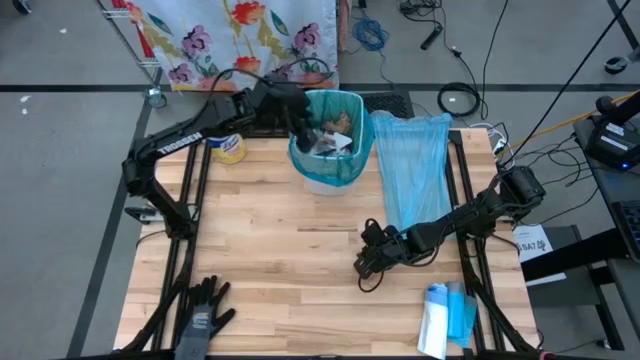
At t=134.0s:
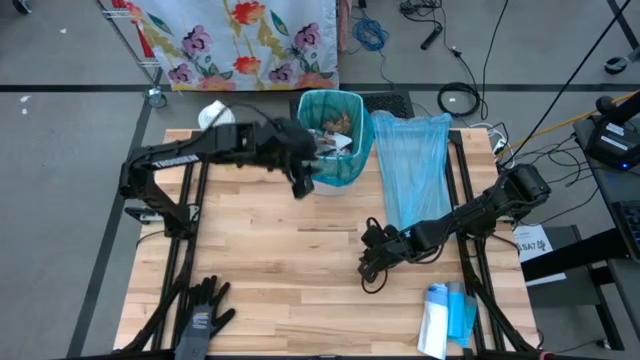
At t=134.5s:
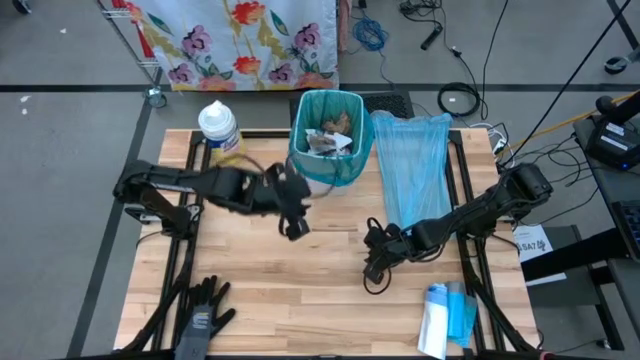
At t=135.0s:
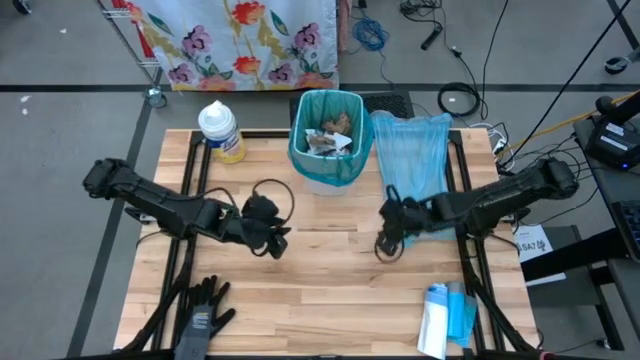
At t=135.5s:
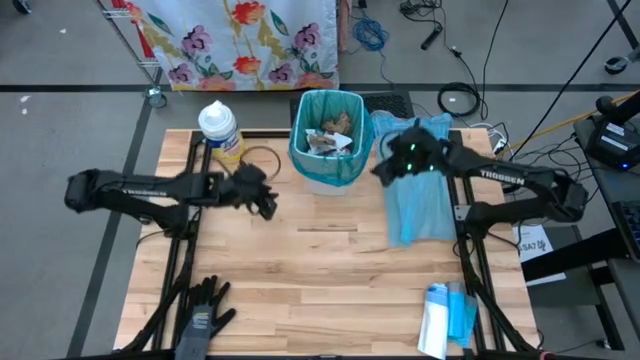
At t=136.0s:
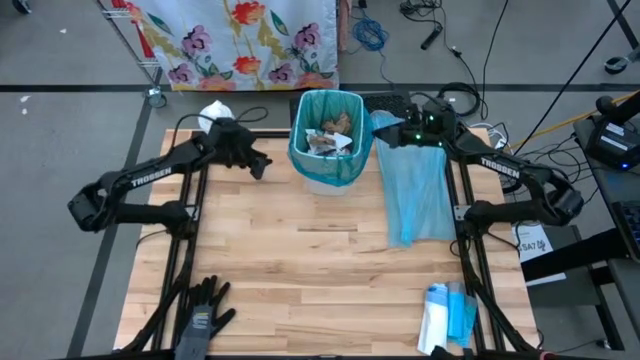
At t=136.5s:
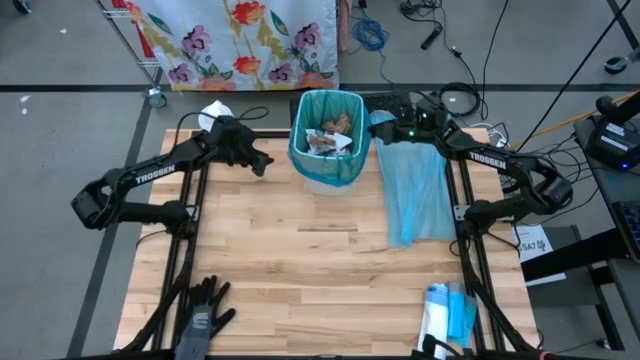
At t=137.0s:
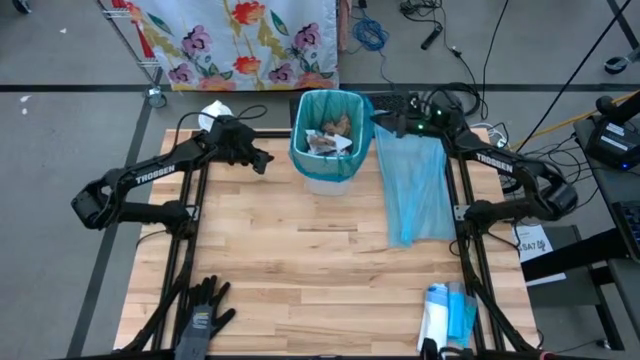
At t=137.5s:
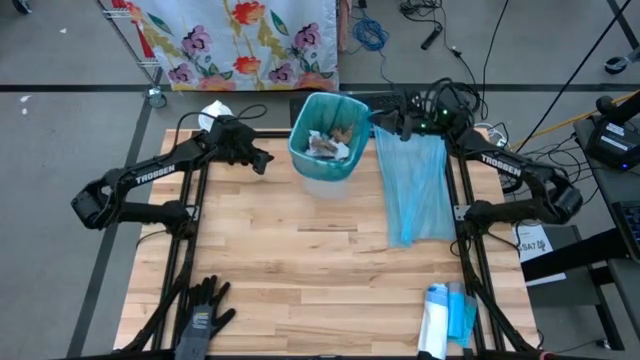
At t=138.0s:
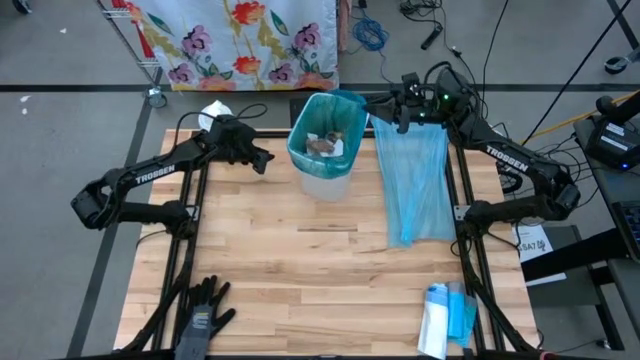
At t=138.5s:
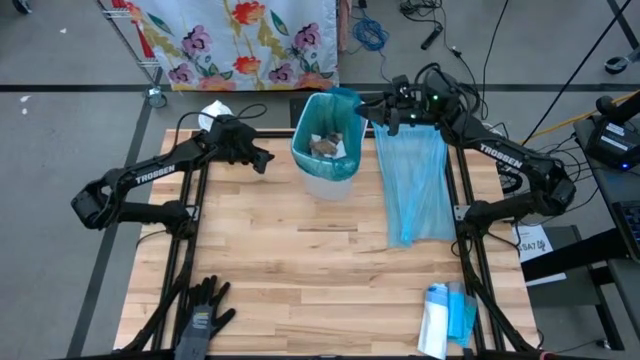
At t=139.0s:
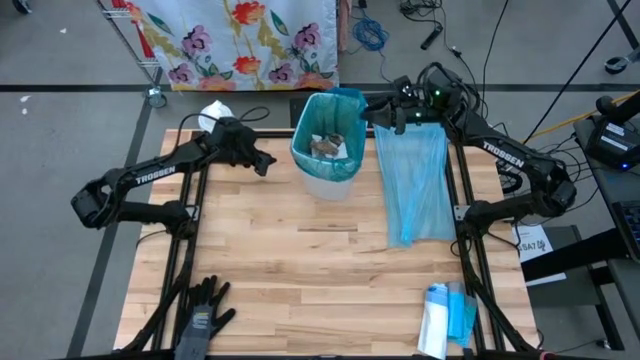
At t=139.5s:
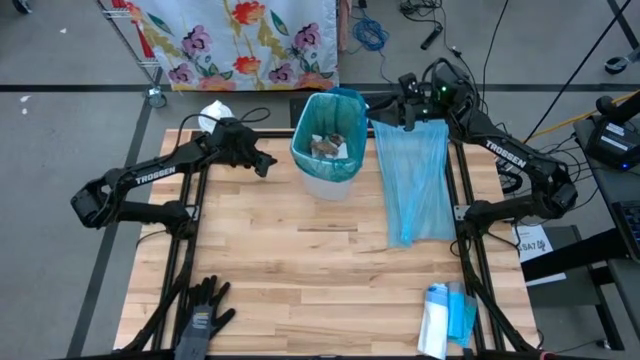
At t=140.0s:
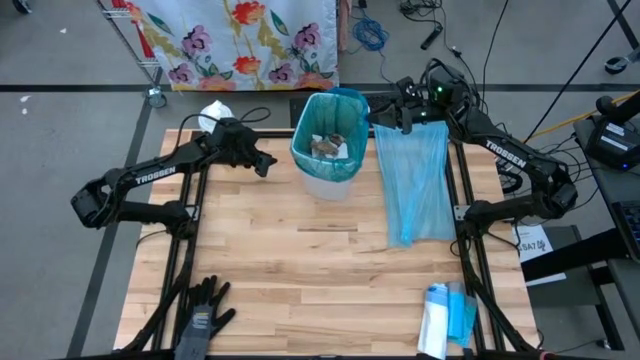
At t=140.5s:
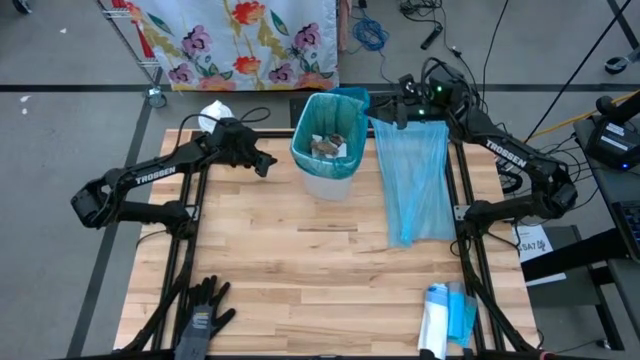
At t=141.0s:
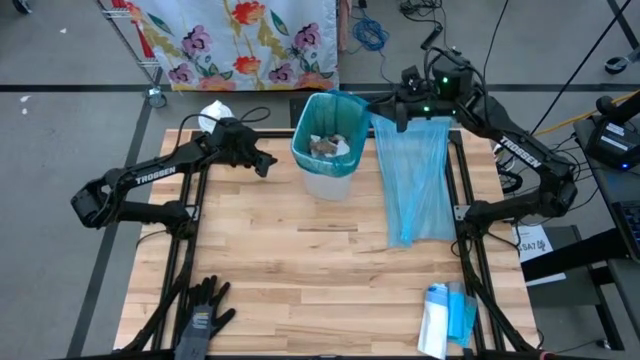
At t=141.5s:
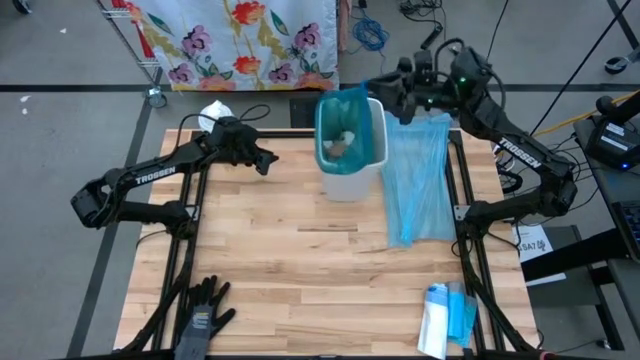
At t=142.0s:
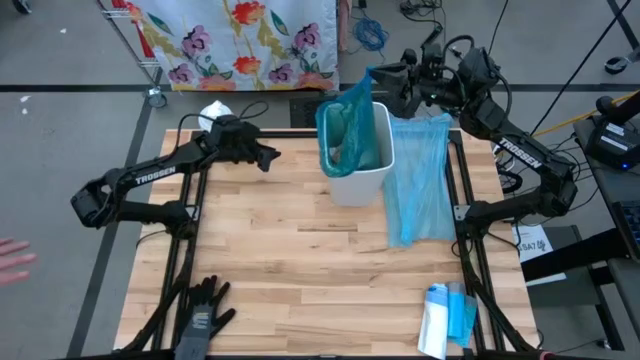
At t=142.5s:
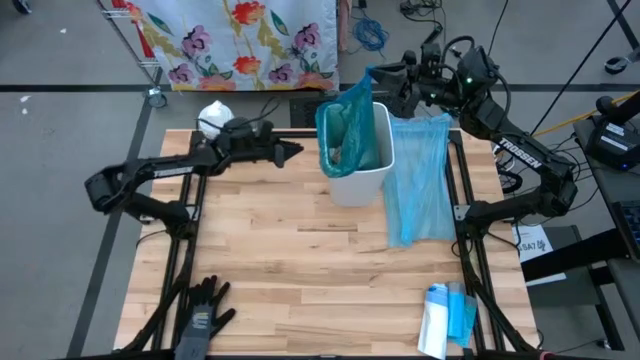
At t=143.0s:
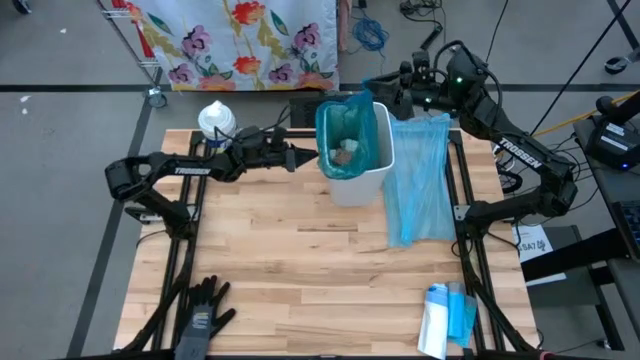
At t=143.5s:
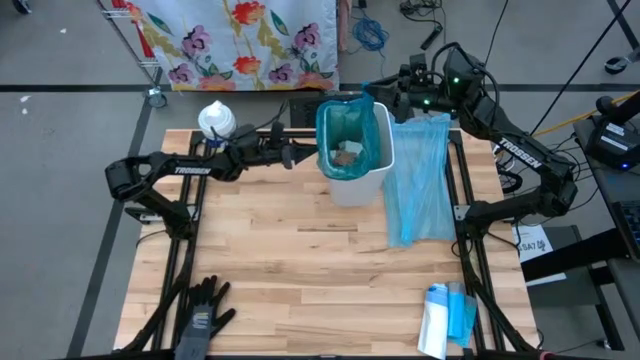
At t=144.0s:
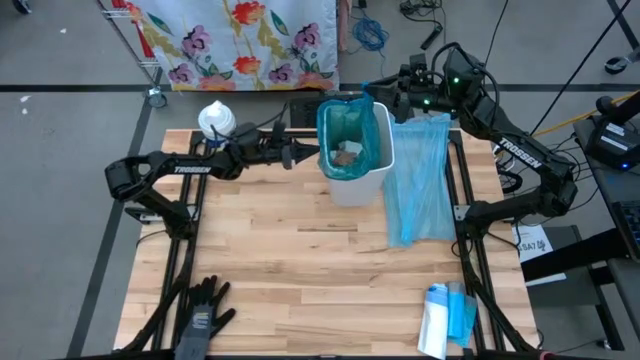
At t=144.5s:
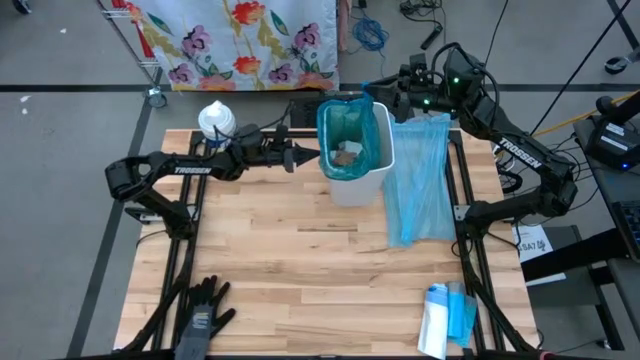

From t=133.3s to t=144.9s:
Task: place trash/remove bag and relplace
Remove the trash bag from the trash bin

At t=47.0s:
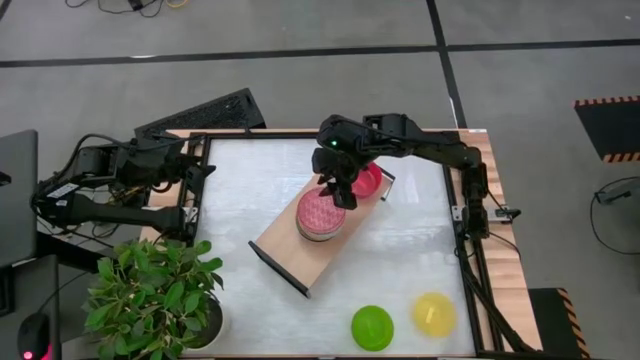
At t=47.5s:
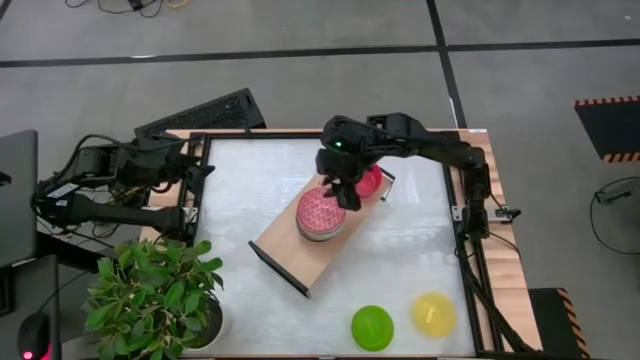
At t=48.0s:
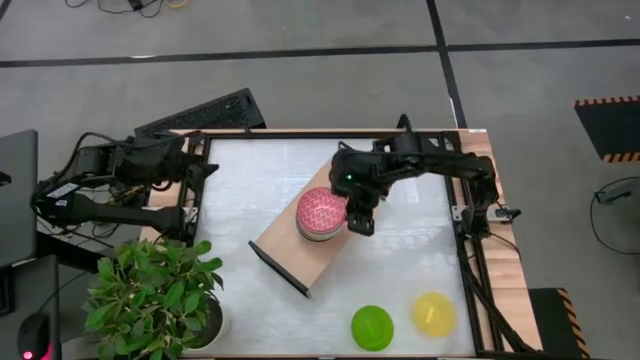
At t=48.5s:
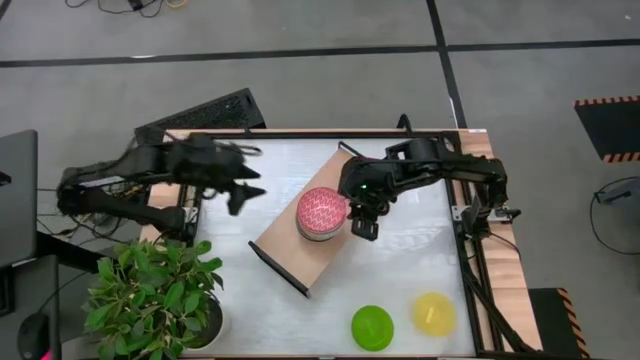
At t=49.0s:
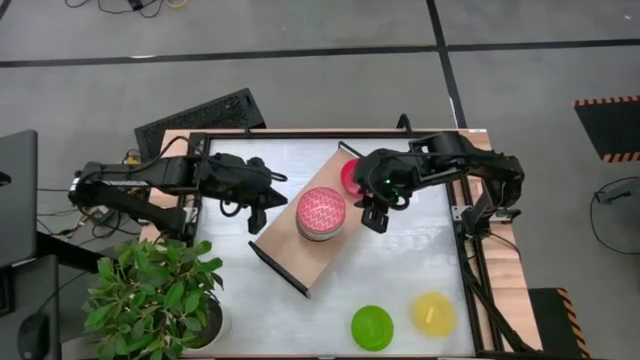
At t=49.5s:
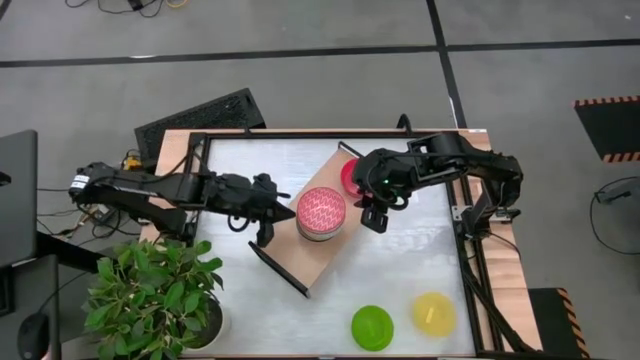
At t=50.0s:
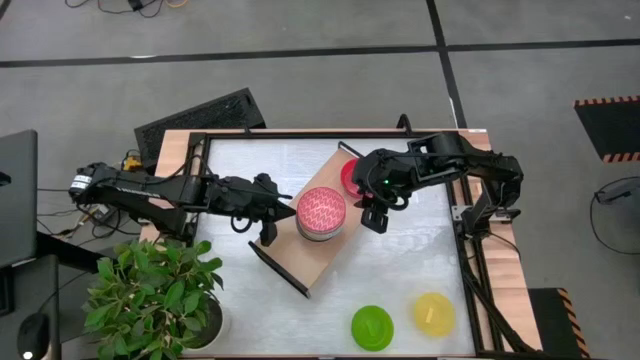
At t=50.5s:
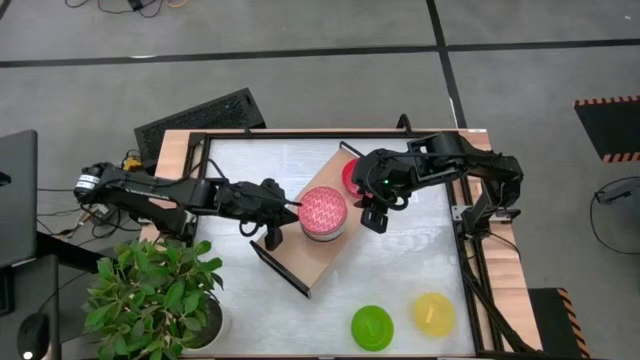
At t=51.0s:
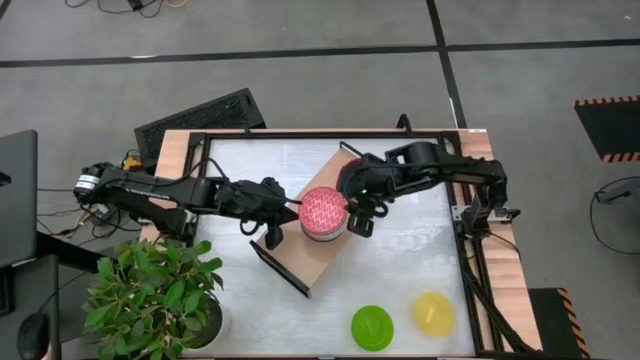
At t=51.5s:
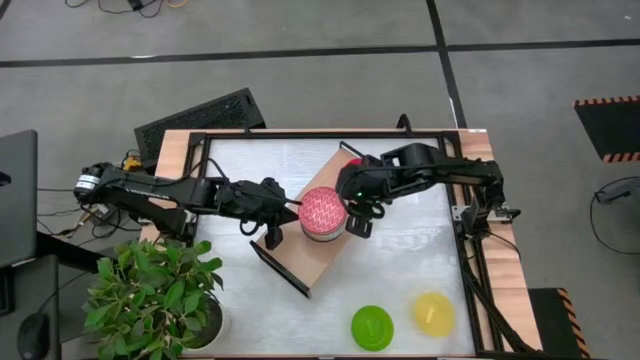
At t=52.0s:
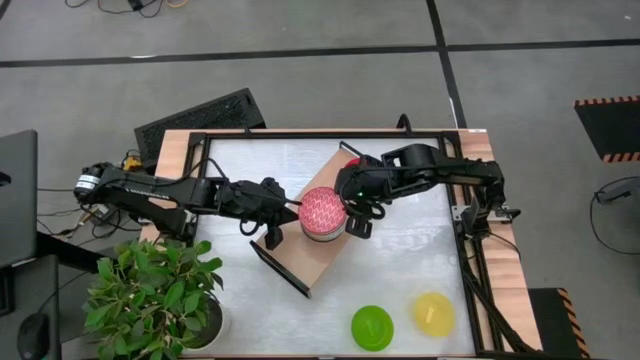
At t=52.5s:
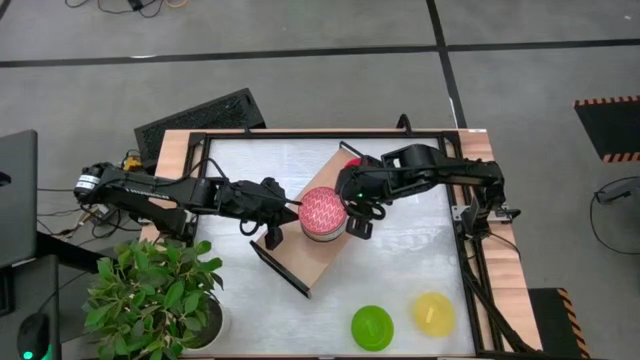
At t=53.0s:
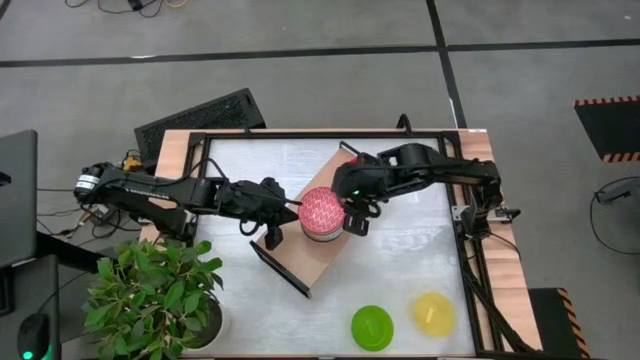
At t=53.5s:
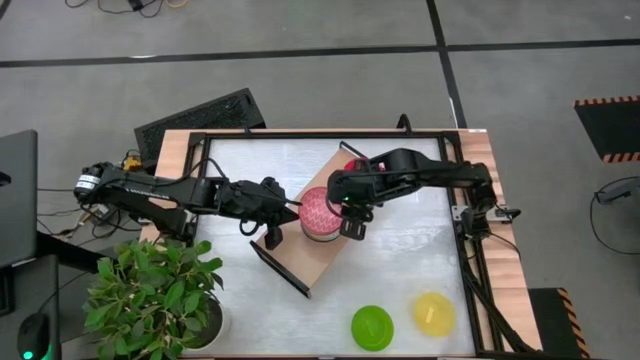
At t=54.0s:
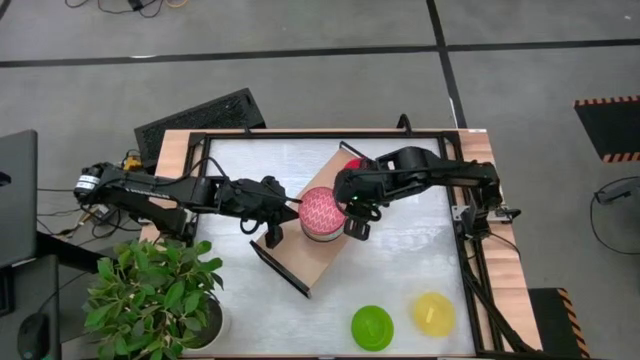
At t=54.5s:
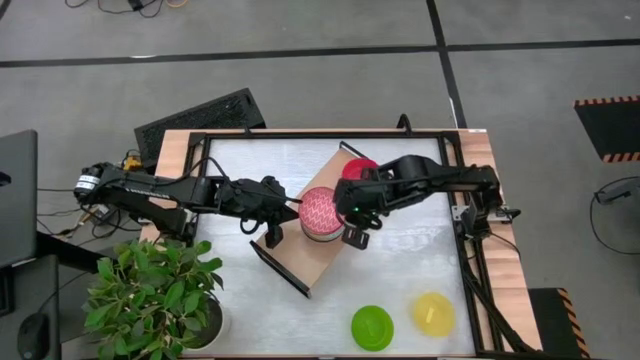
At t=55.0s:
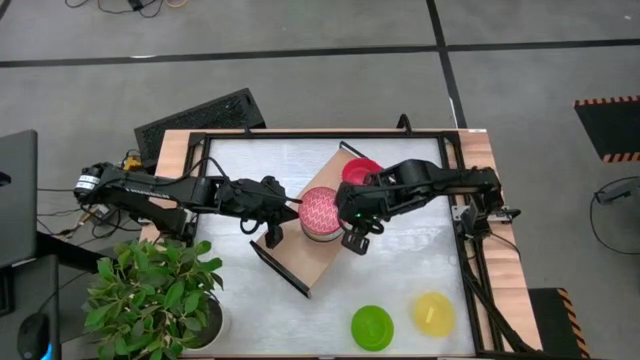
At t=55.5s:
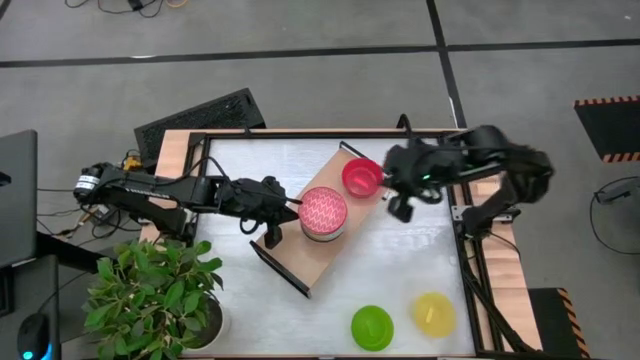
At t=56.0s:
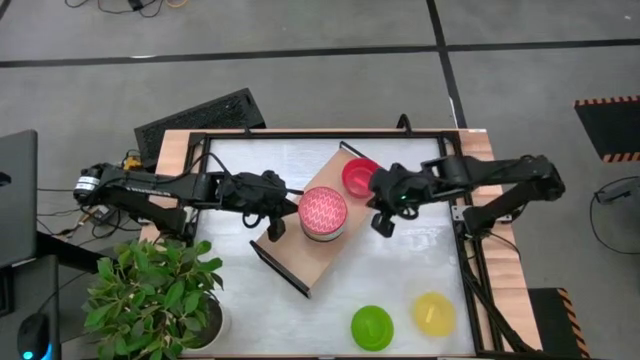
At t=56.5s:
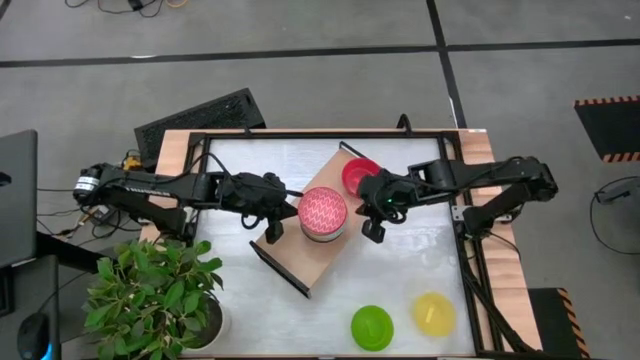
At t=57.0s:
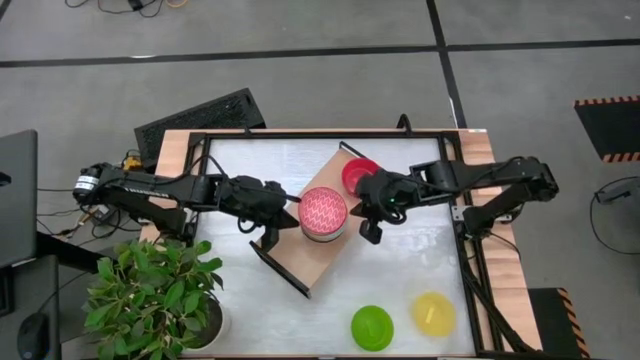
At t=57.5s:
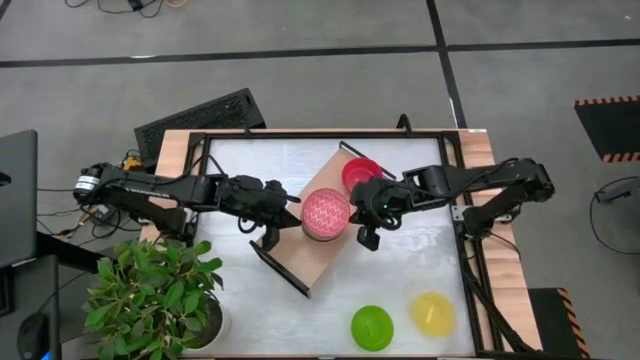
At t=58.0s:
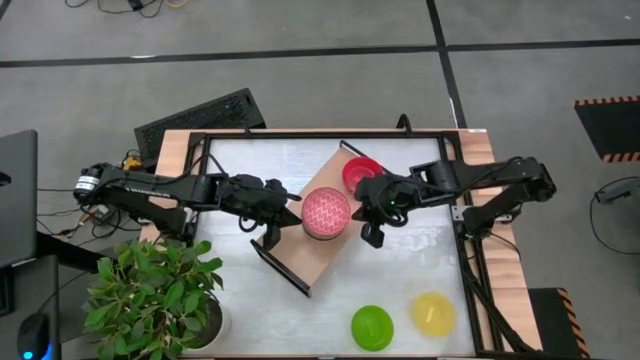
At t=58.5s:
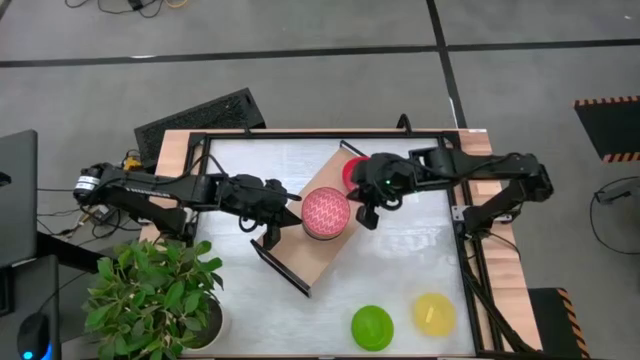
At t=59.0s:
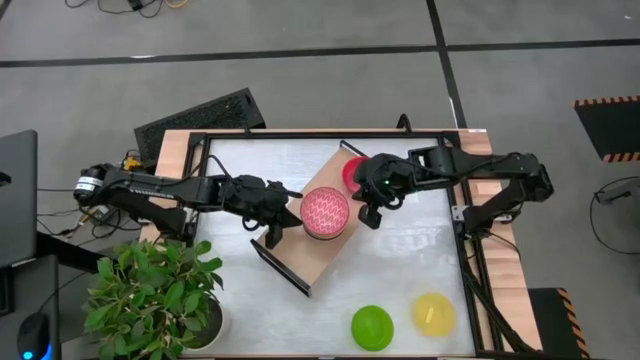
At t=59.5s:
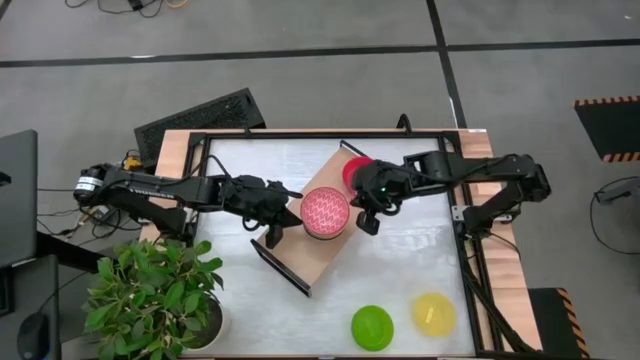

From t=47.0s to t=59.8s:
Task: Place and stack bowls onto a shelf
Adjust the stacked patterned bowls on the shelf
